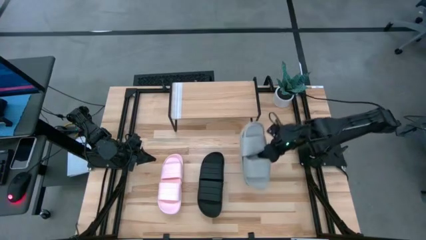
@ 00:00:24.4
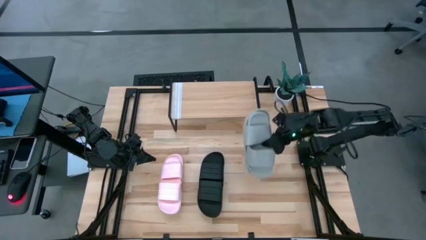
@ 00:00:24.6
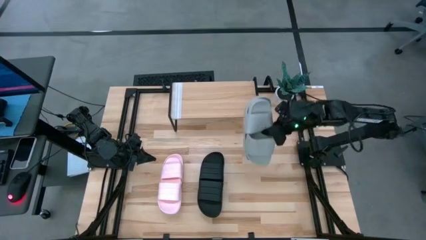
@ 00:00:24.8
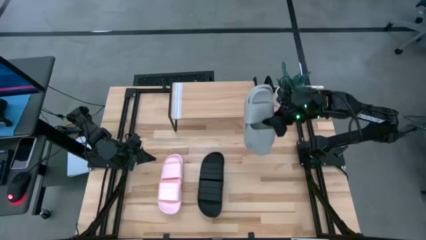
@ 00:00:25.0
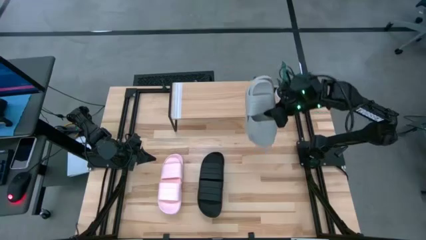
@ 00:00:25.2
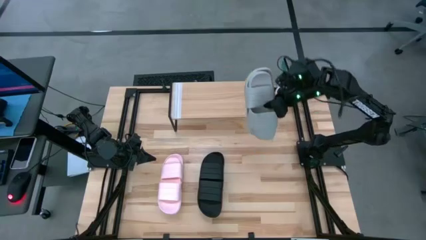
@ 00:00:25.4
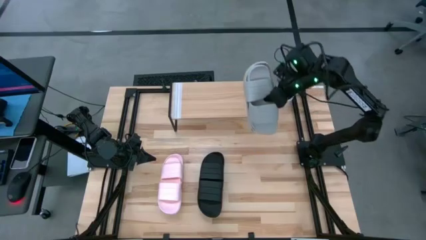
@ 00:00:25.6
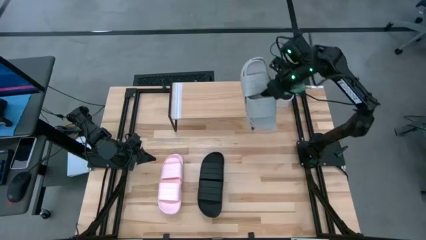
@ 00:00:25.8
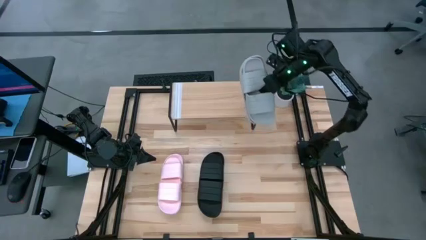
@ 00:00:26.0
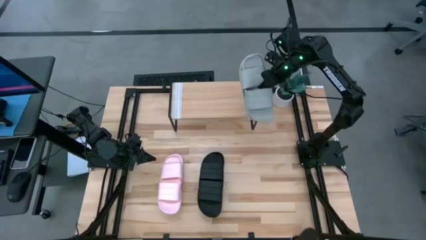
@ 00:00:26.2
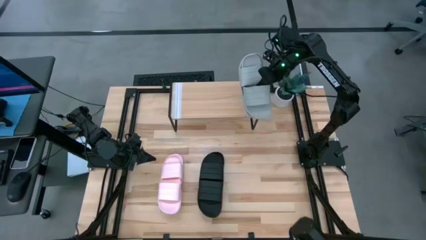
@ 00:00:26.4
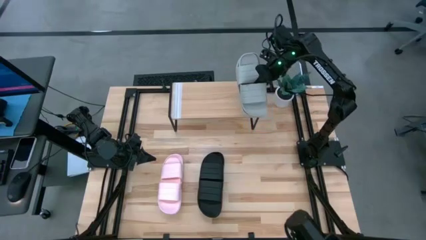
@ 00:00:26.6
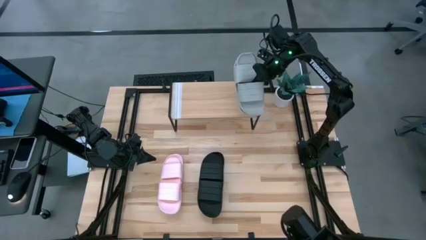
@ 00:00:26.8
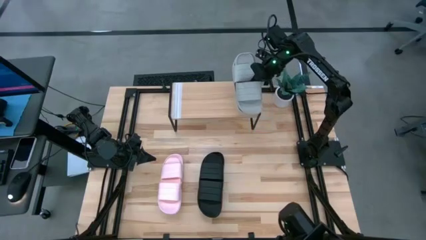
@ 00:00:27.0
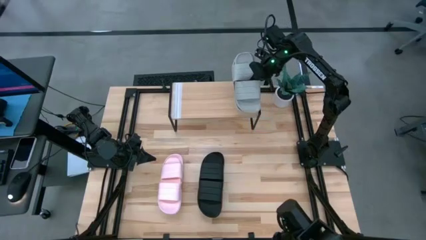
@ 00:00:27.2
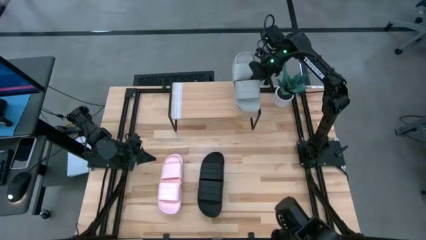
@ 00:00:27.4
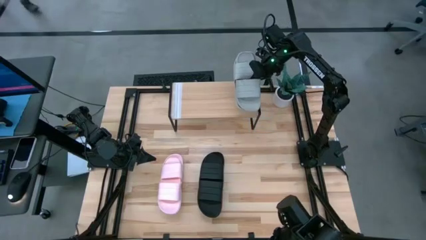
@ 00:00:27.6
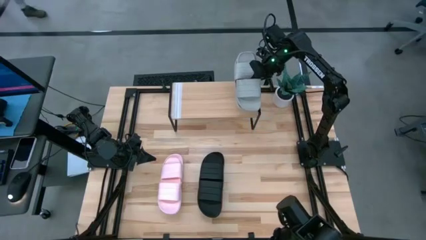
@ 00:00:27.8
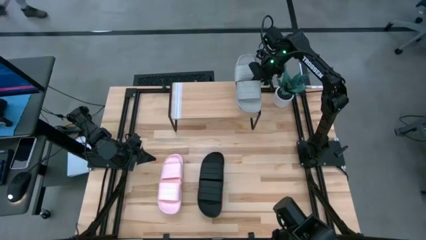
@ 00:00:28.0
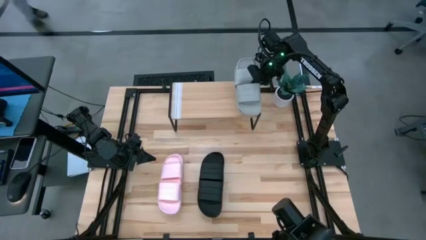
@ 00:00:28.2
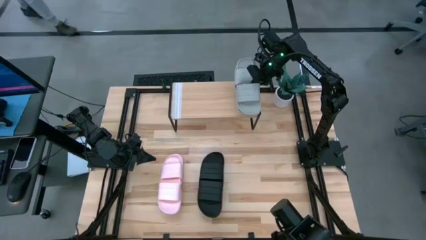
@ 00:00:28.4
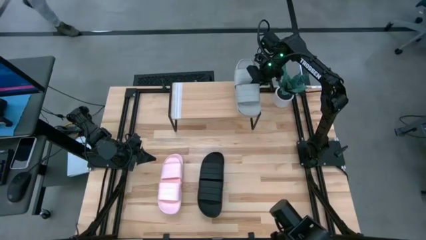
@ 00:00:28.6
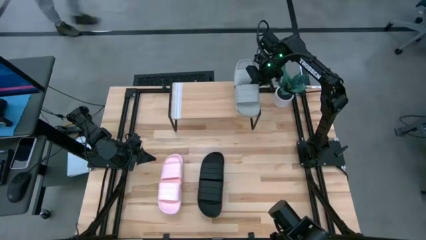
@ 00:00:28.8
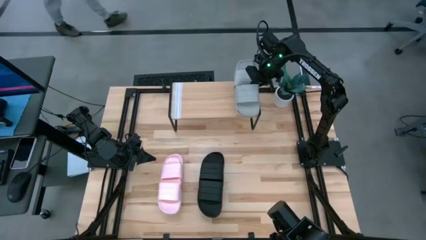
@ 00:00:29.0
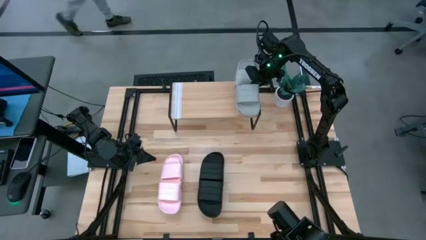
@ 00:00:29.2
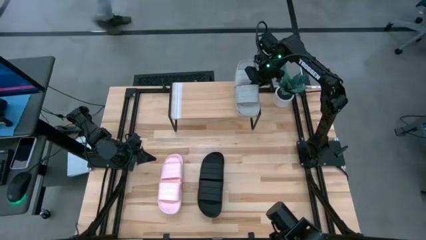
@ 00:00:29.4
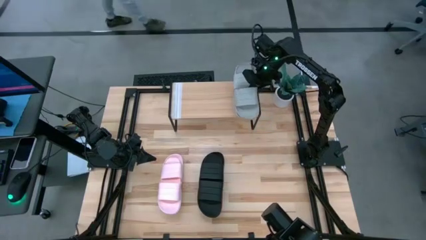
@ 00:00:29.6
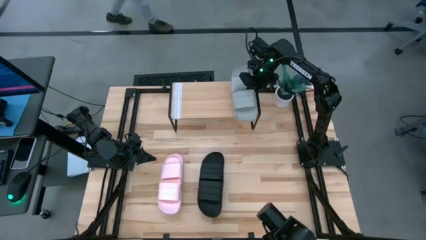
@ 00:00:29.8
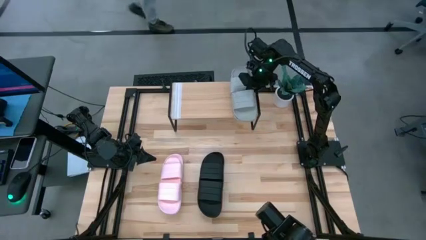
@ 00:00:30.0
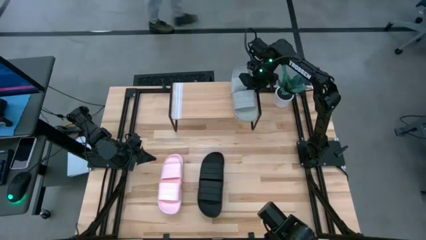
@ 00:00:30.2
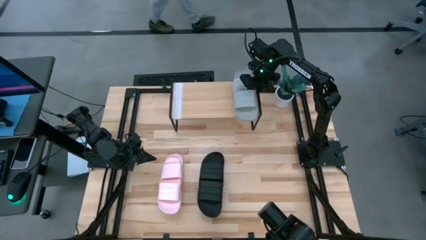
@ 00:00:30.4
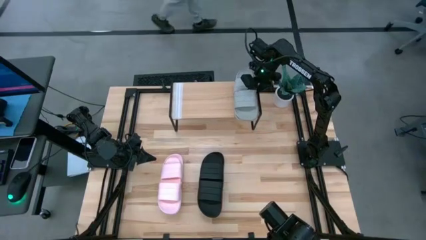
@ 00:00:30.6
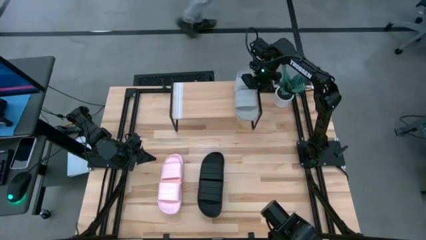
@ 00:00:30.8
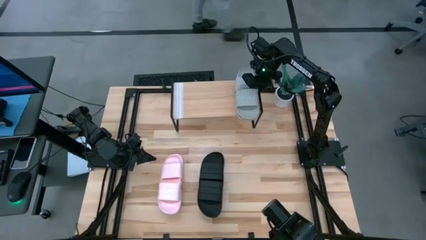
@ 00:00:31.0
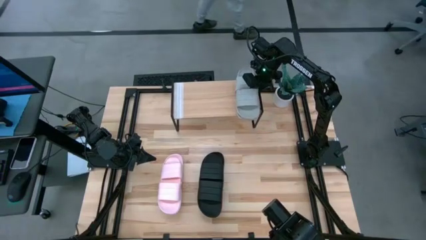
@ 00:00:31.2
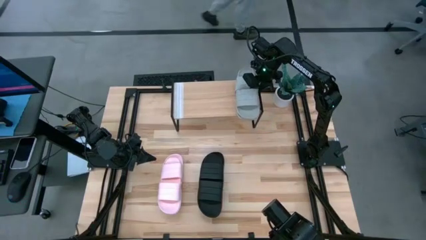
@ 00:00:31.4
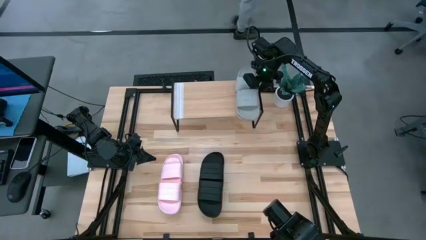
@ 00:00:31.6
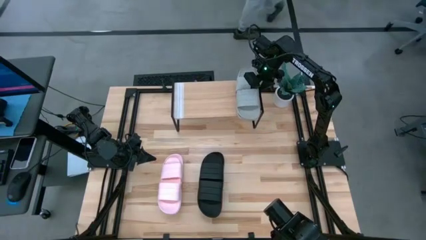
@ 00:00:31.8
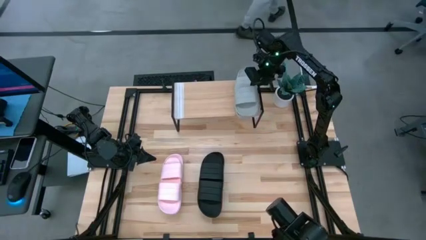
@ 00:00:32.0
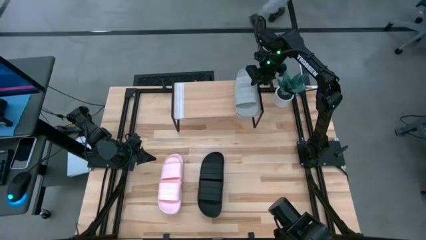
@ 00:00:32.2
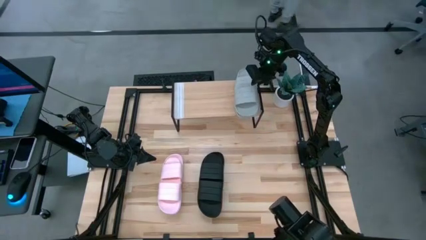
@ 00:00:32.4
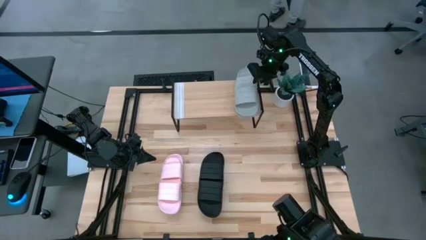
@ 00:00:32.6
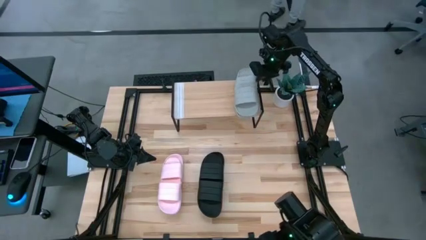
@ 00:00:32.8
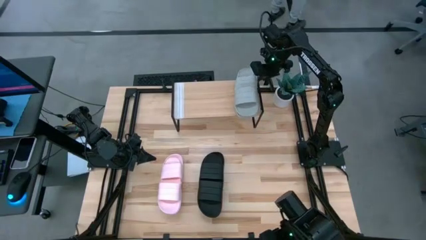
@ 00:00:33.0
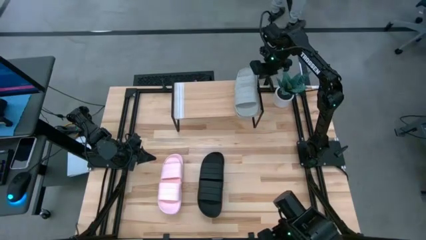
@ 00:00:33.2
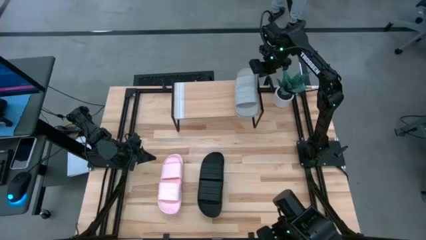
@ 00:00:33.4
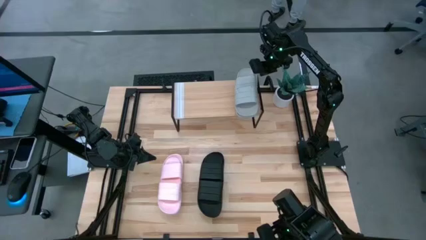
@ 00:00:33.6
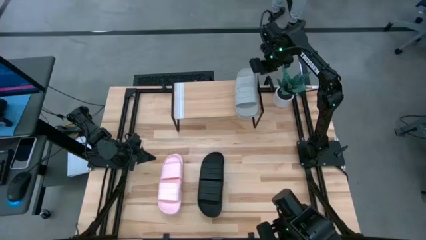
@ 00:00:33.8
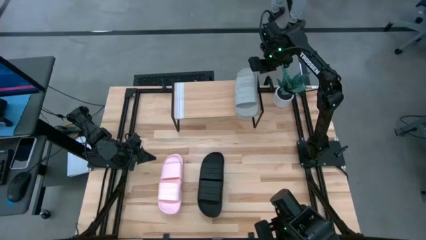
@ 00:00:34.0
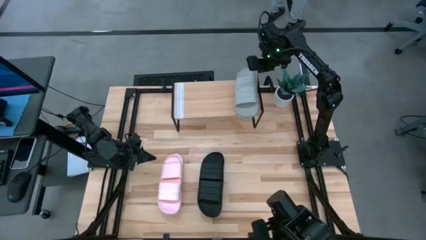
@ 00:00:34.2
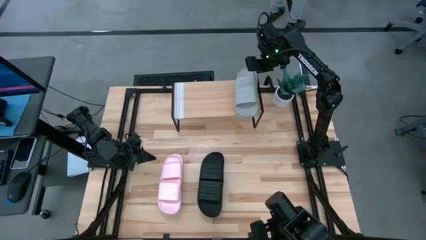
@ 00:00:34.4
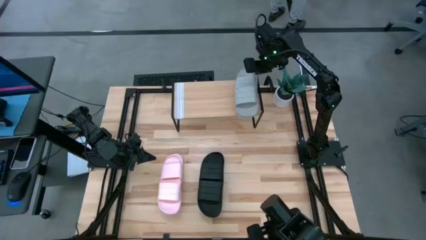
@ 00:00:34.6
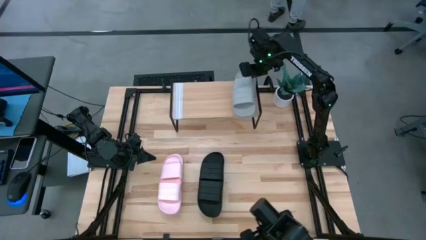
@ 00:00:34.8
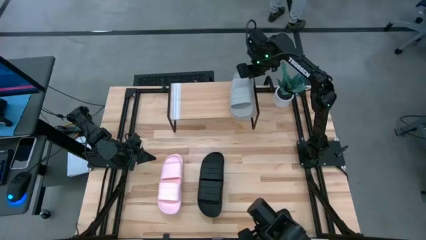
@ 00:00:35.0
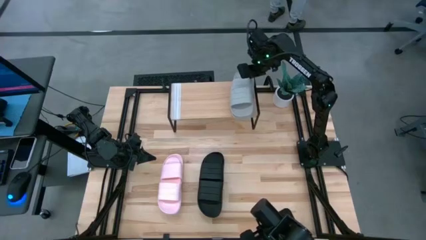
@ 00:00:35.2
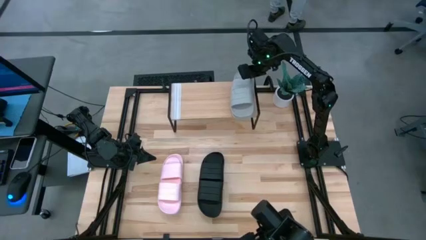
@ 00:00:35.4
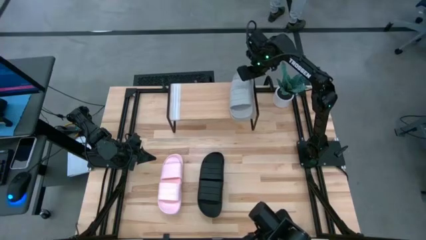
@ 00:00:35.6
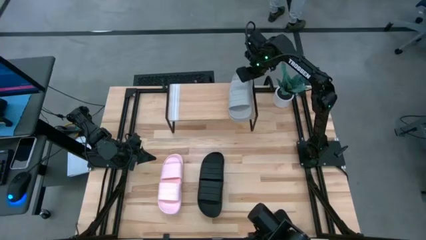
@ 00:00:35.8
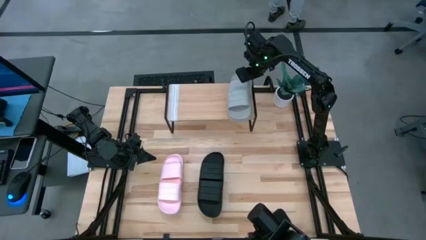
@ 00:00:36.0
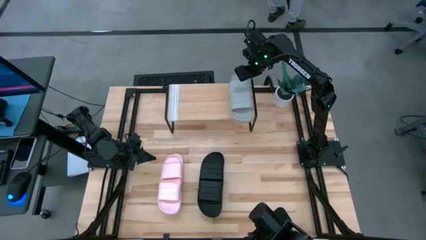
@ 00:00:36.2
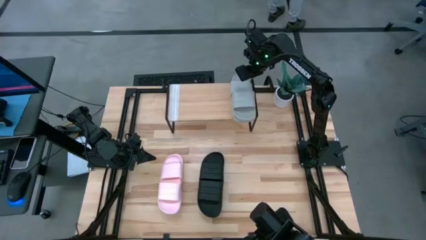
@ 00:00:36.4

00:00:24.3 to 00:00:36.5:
Task: Pick and place slides into the shelf
Put the gray pair of slides on the shelf
